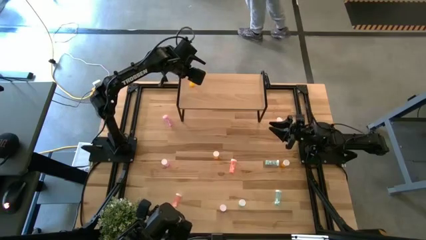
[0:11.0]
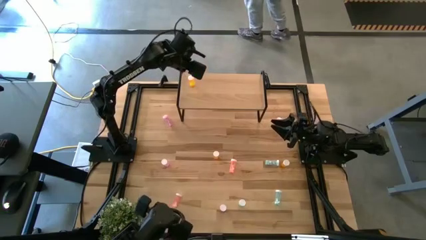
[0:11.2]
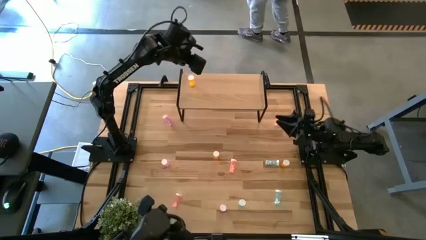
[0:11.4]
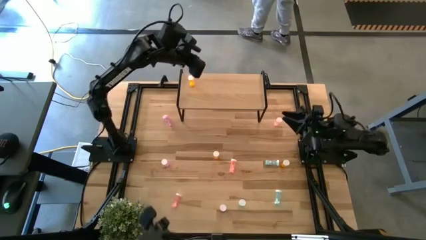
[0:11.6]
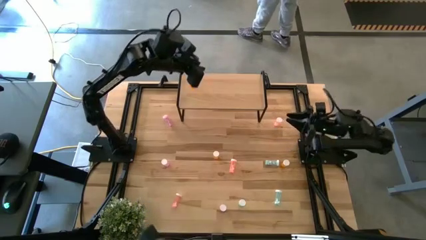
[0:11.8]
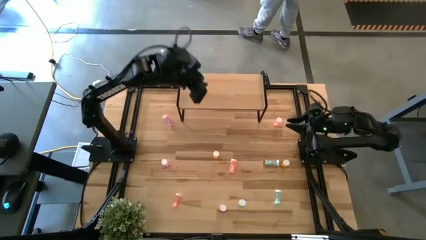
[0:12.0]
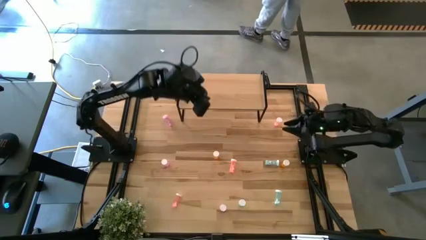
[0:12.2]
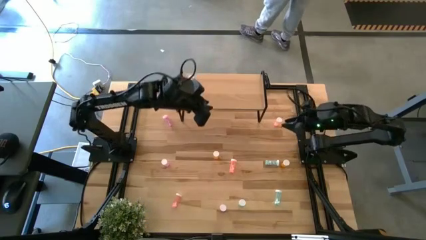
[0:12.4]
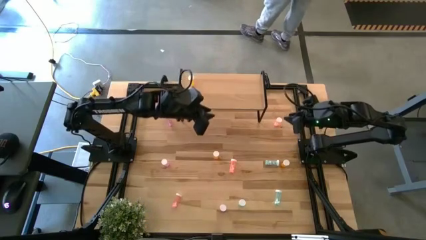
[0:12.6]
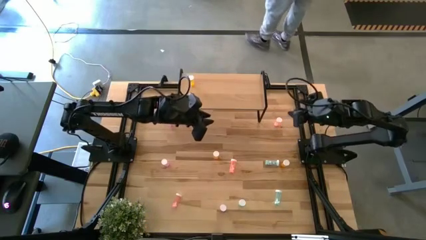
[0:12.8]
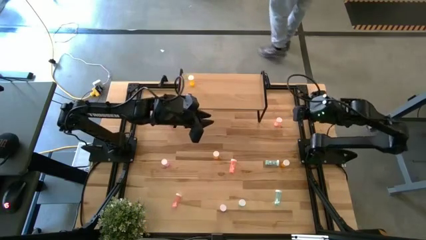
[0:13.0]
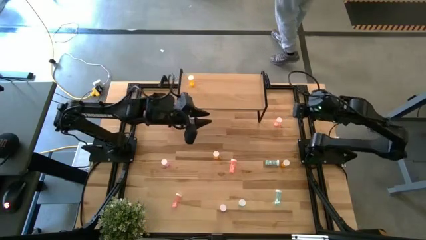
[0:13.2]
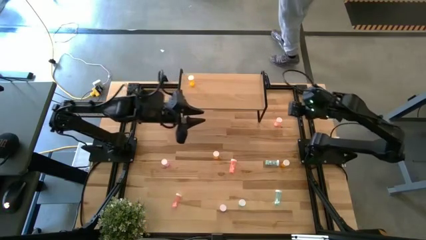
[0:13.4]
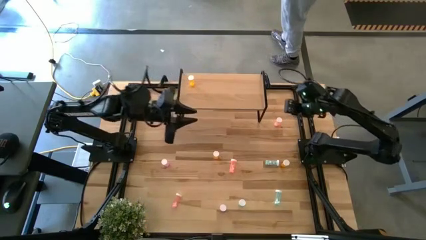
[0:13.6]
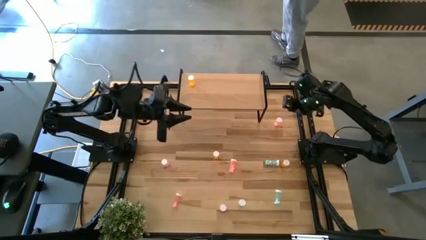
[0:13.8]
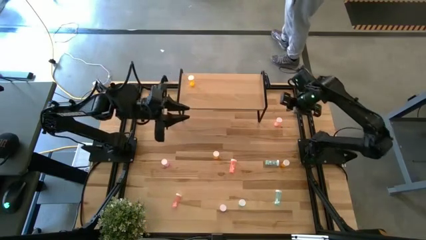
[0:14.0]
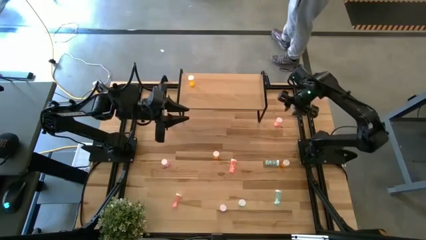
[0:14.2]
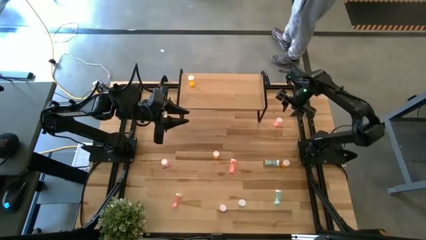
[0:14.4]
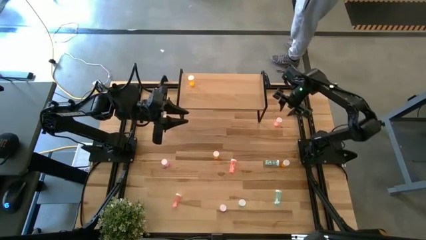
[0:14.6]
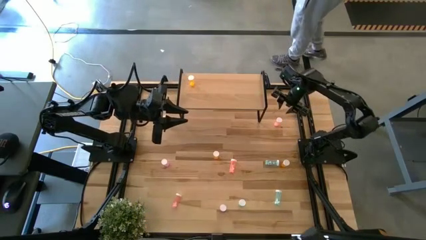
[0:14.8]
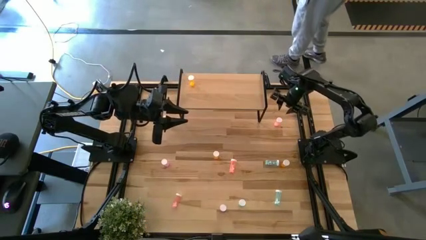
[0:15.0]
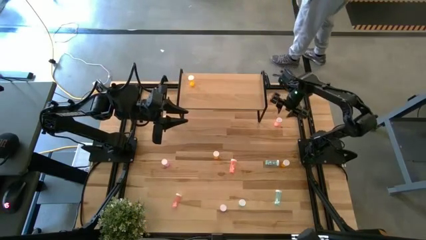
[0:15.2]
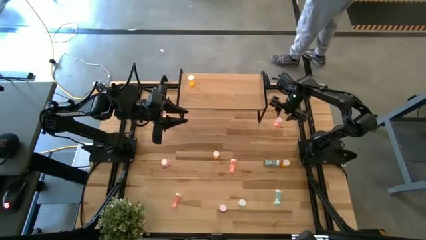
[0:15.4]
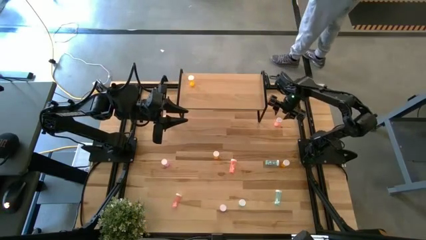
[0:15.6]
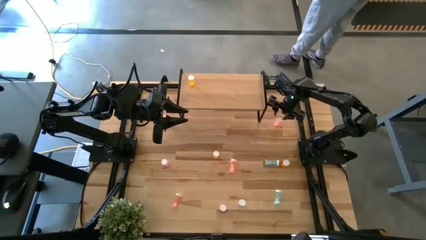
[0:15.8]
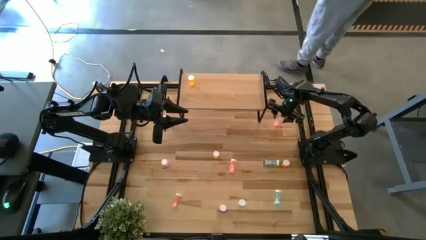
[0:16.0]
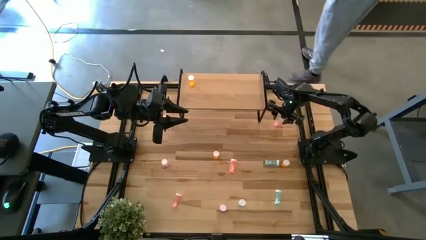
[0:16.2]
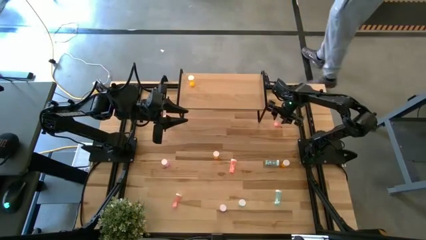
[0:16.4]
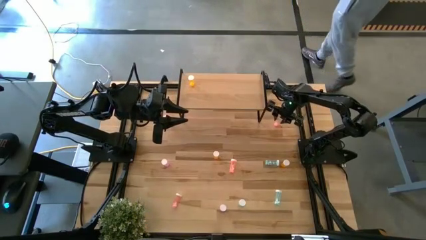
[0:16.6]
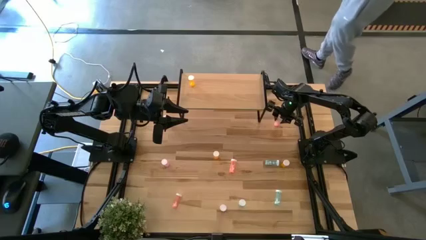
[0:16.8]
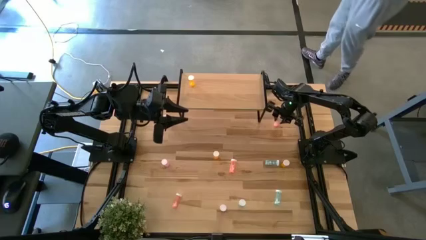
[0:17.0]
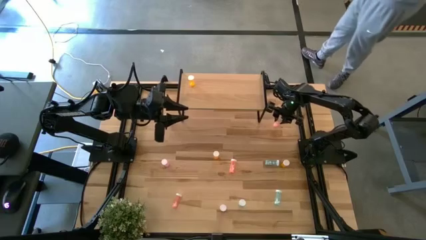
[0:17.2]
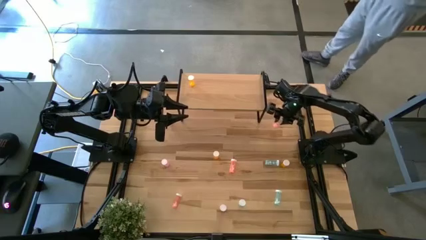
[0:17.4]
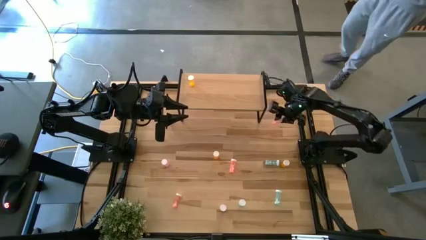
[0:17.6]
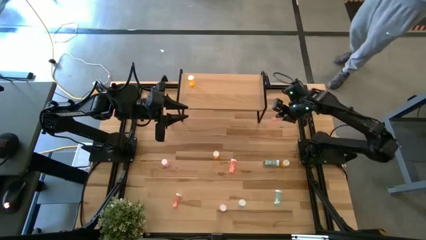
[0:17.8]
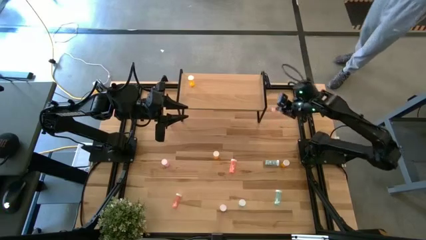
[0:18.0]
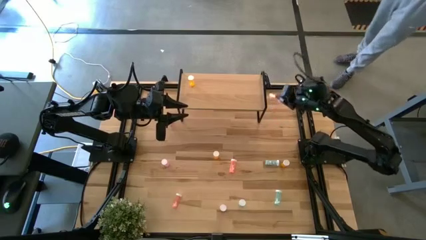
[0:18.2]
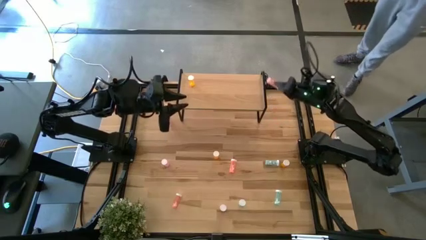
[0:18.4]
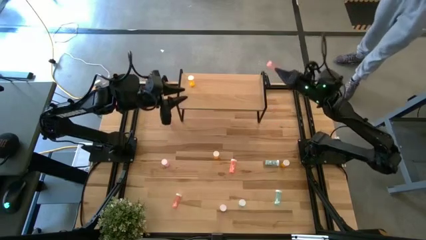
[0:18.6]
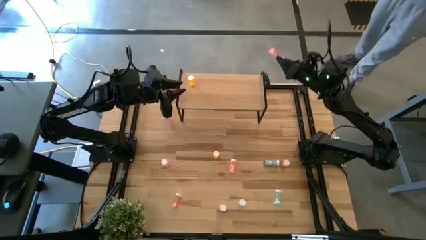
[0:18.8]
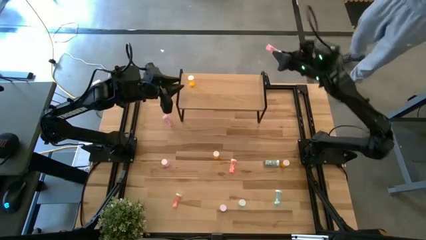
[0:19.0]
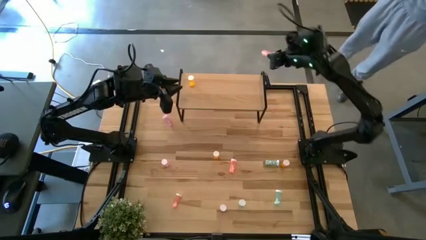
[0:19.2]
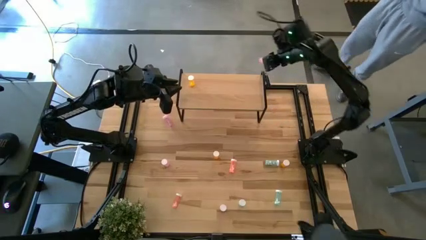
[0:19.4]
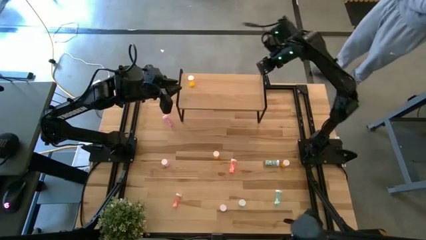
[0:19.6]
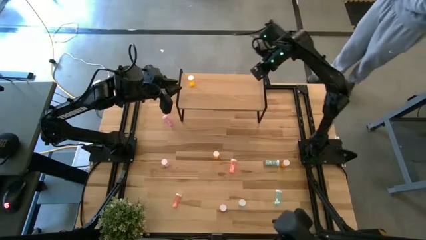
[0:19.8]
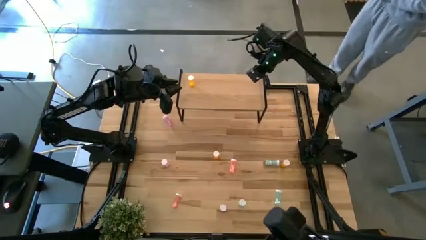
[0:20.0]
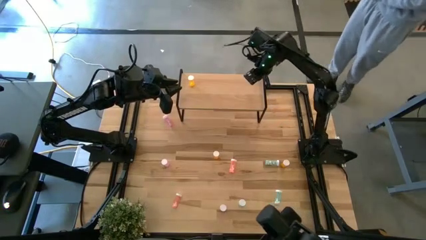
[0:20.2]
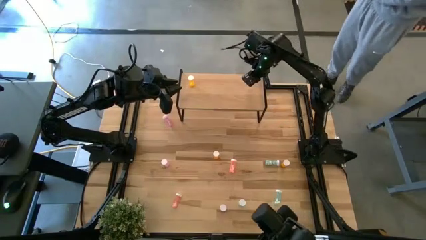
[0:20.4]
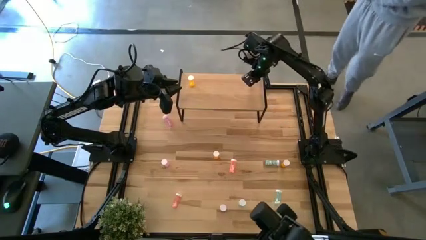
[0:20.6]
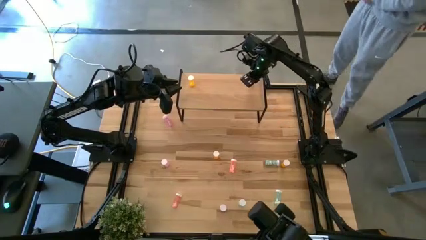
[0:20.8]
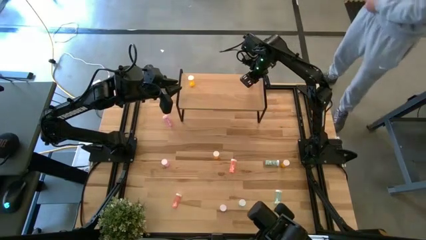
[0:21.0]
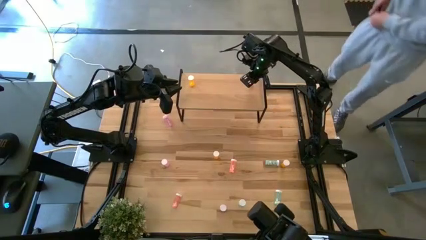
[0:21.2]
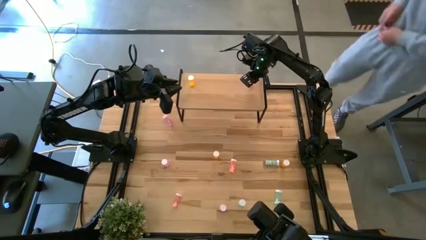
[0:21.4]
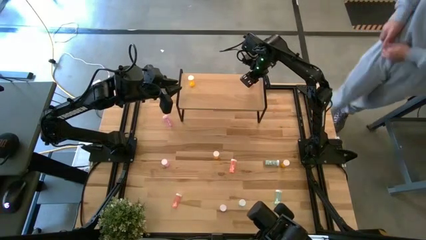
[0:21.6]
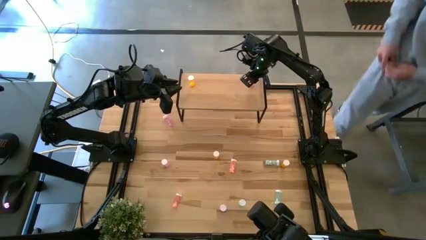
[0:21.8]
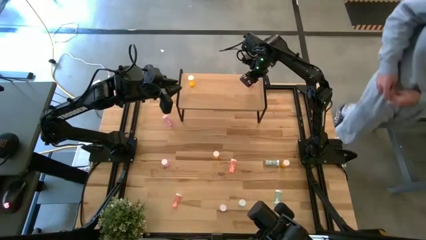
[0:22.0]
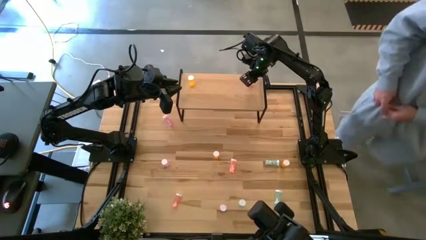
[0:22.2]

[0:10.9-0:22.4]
Task: Pick and place medicine bottles onto shelf by color
Put the top pink medicine bottle on the shelf
